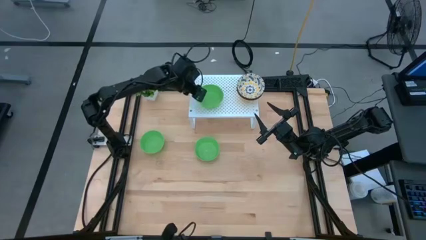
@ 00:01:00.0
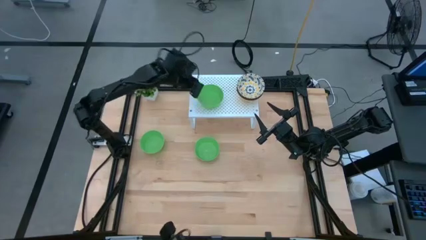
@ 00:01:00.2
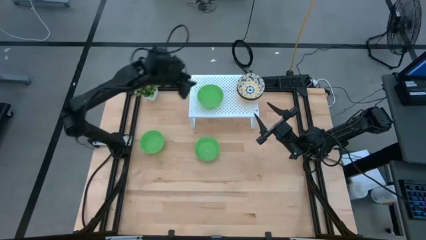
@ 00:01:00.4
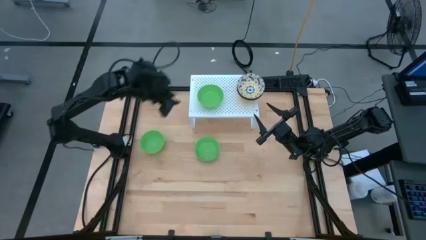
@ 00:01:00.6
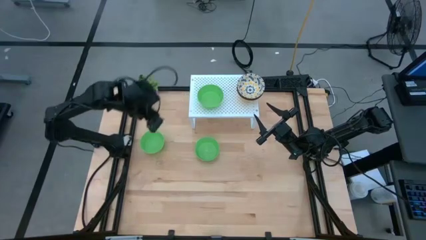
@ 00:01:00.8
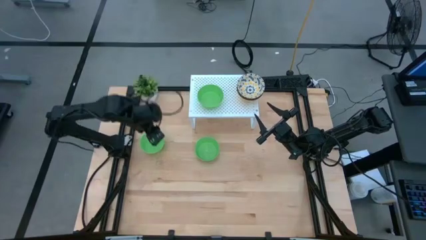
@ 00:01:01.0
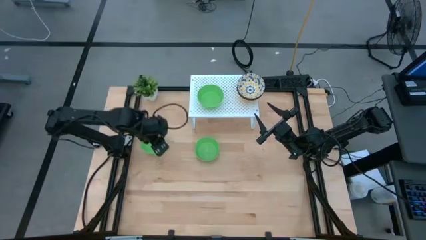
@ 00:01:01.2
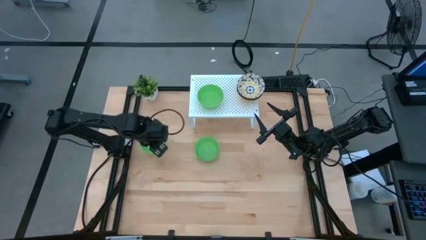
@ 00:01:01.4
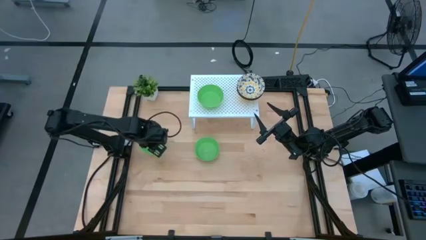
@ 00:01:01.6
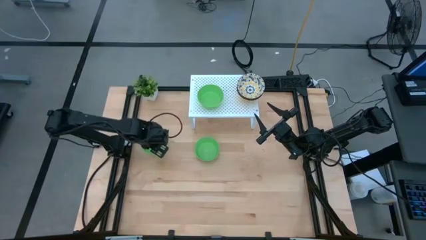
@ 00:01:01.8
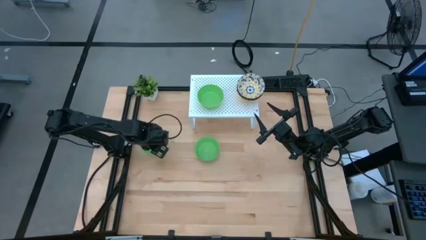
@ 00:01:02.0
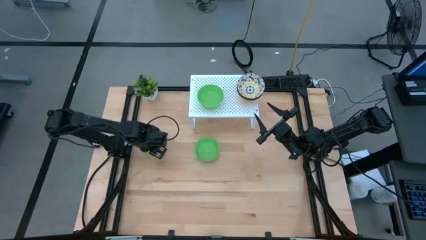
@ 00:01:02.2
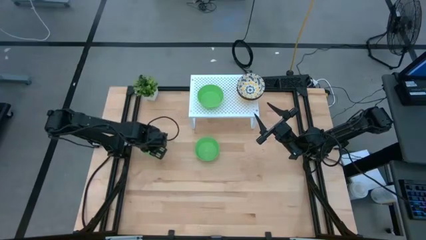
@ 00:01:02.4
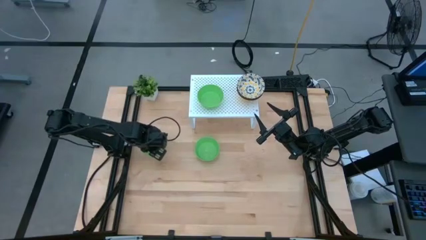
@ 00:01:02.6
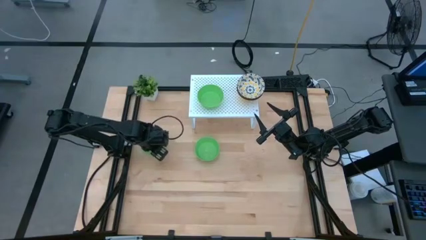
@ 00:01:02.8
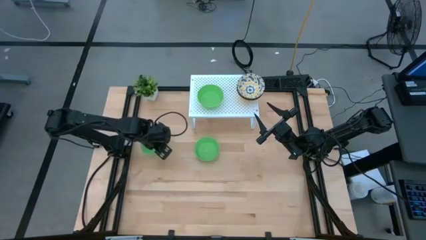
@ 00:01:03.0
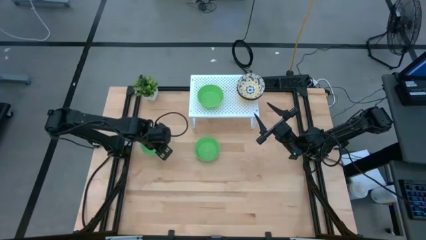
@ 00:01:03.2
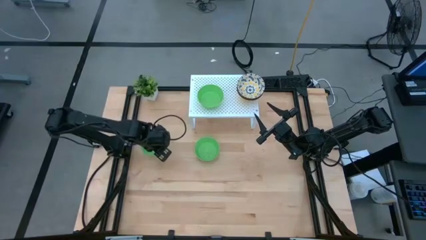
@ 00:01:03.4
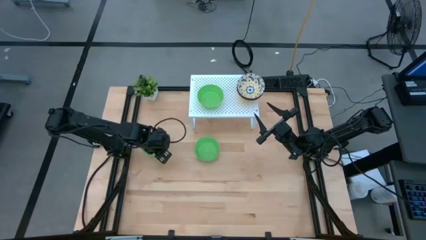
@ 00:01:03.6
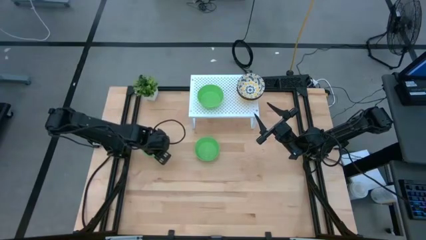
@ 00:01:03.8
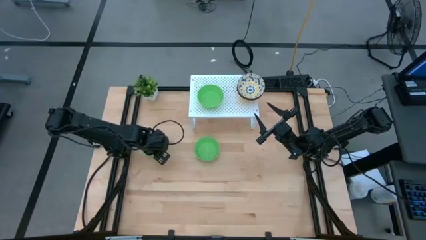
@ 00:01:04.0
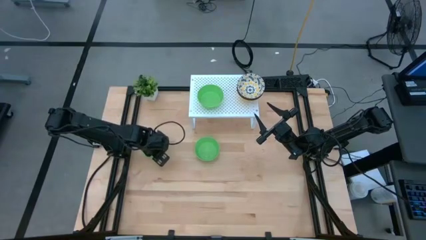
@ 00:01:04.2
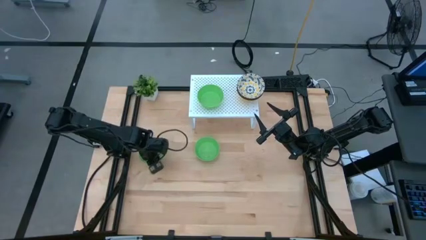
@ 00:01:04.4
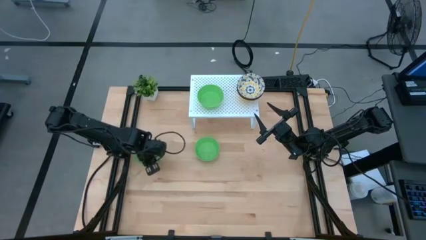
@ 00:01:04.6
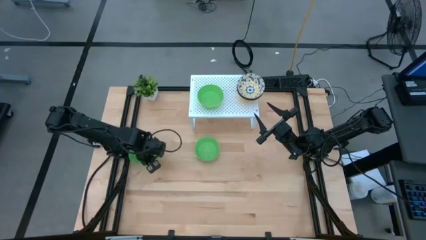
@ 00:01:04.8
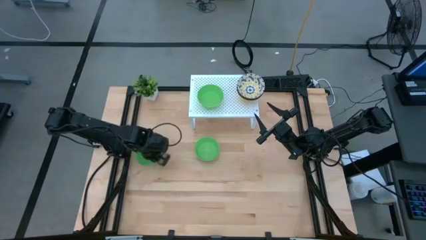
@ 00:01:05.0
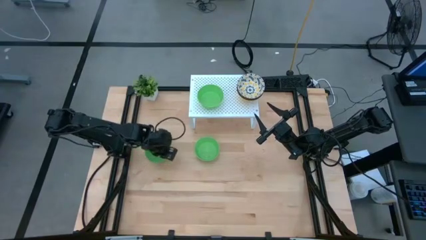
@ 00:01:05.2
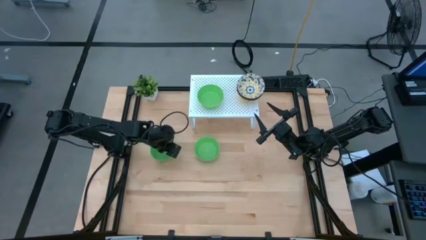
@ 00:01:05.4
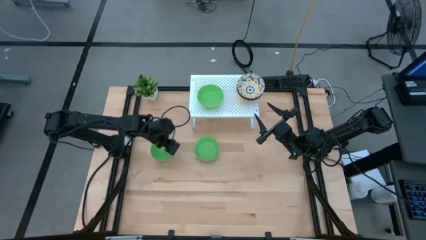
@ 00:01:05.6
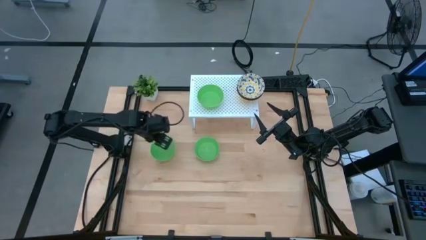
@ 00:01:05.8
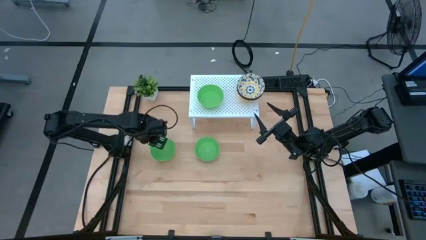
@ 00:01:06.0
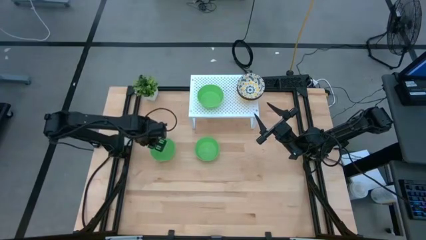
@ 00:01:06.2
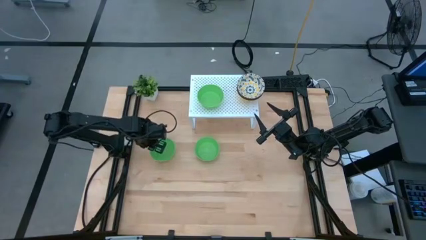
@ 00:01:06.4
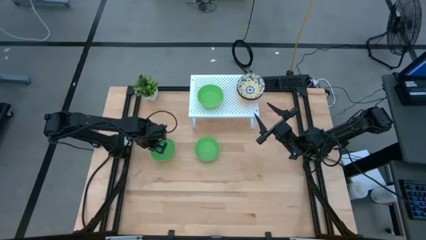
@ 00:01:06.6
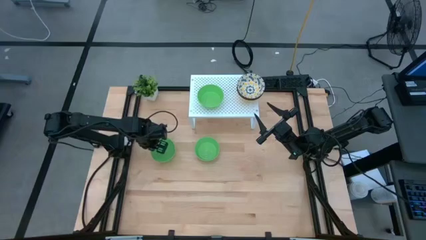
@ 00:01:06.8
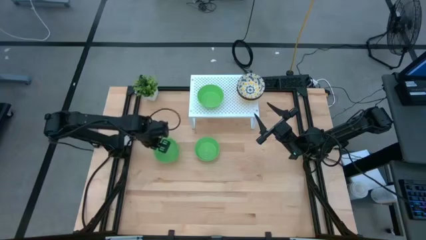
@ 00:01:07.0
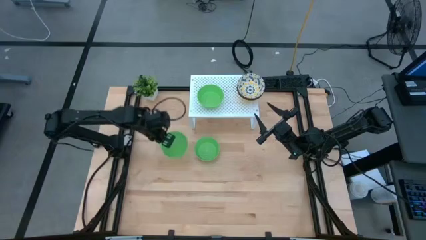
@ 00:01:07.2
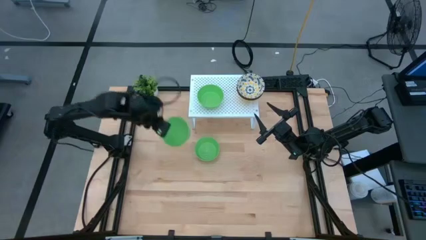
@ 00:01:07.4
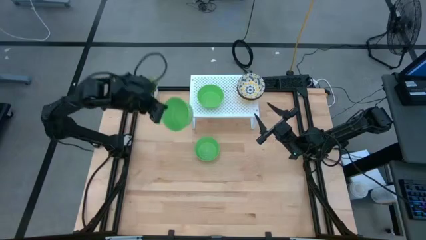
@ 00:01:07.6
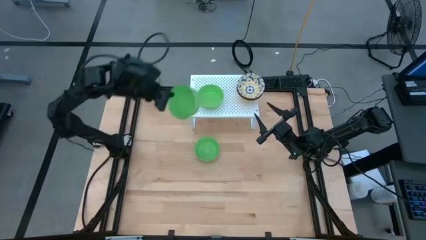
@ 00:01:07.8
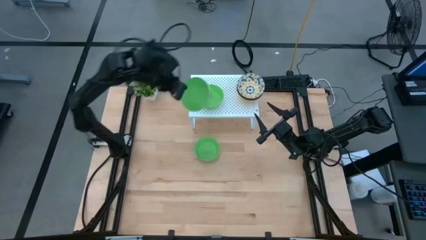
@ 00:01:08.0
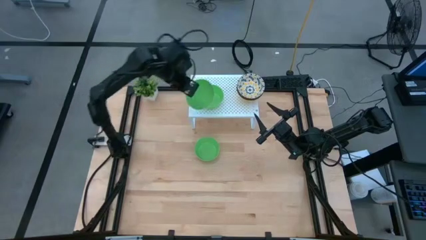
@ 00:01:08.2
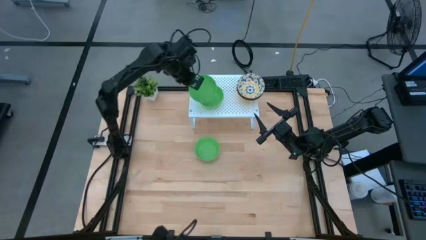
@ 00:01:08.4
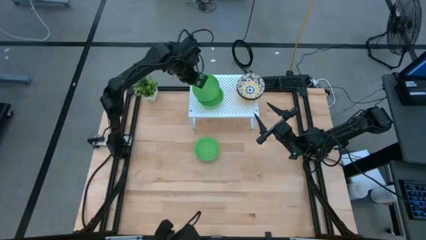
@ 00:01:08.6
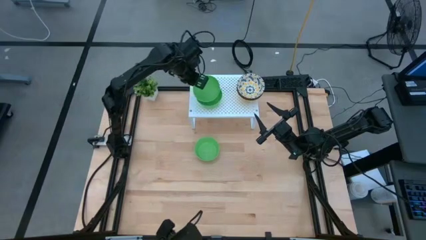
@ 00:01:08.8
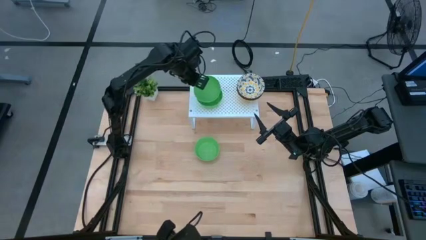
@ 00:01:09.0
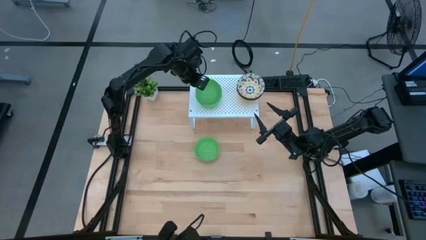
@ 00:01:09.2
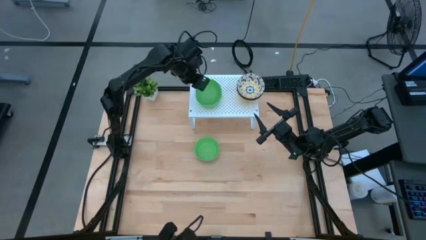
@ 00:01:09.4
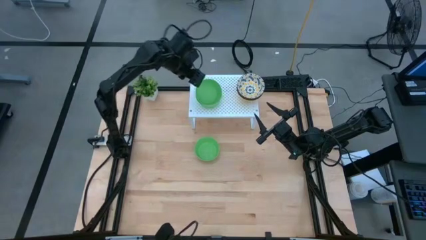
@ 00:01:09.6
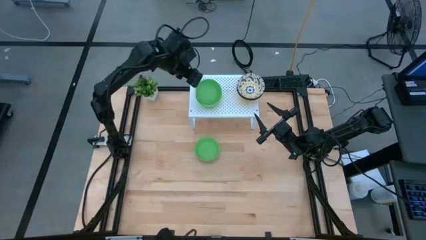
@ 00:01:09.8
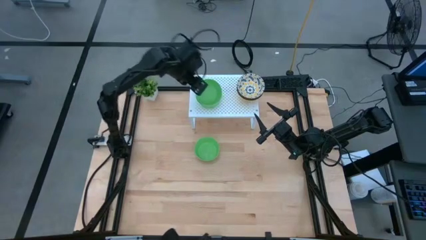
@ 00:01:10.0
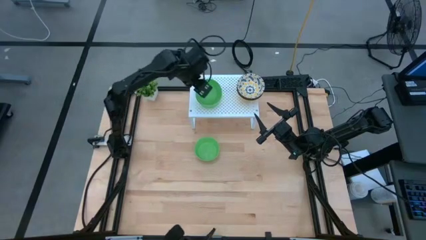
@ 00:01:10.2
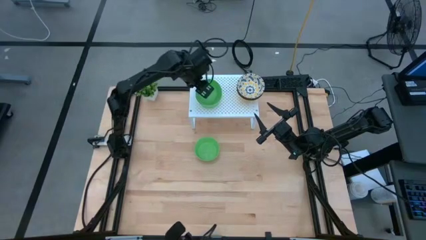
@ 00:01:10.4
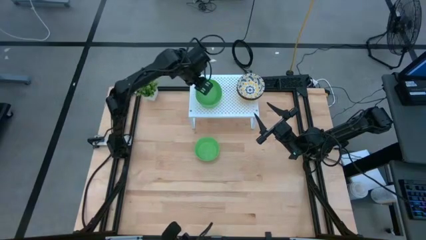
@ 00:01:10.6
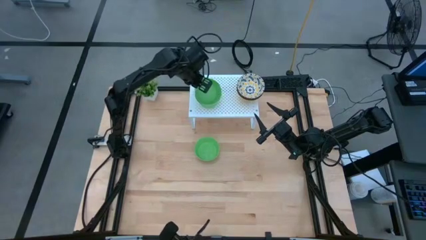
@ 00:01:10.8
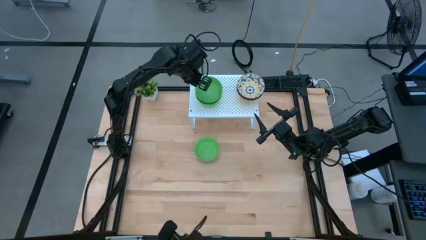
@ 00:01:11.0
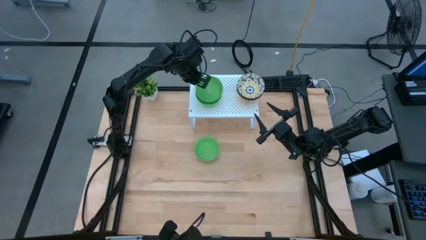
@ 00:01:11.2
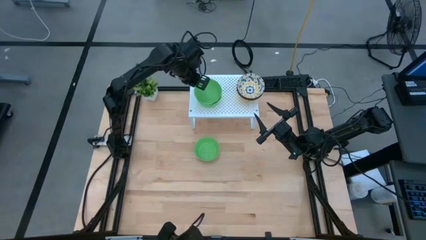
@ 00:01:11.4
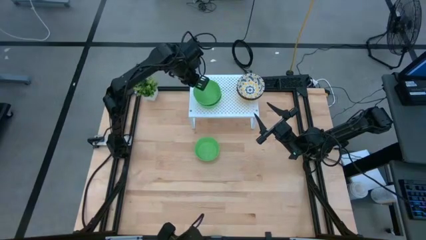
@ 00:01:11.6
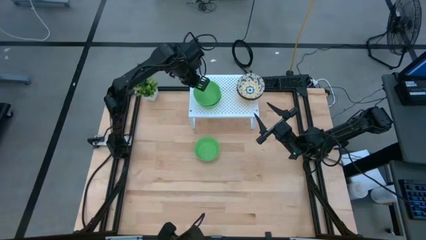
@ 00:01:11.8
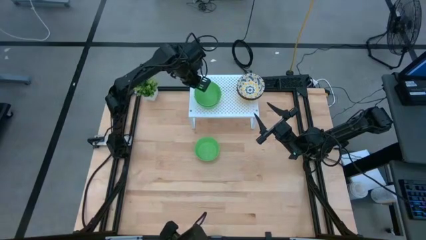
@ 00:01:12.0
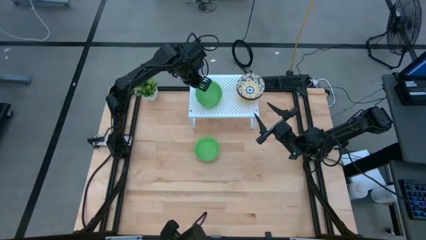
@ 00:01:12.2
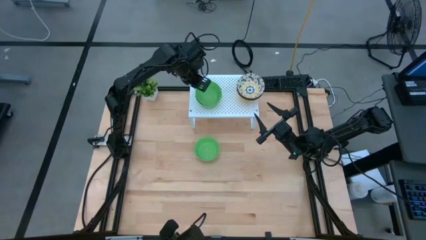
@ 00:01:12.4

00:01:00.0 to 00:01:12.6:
Task: Pick & Place Mini bowls
Stack the left green bowl on top of the green bowl on the shelf
